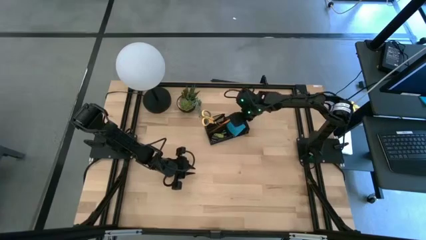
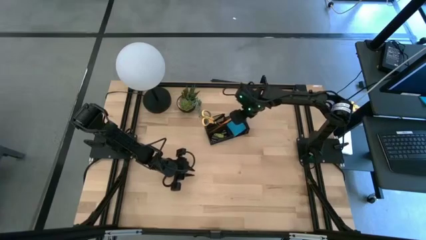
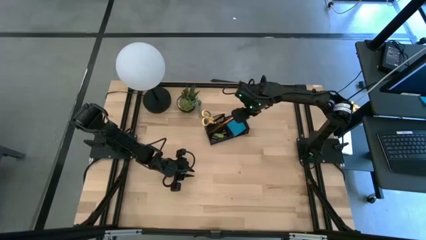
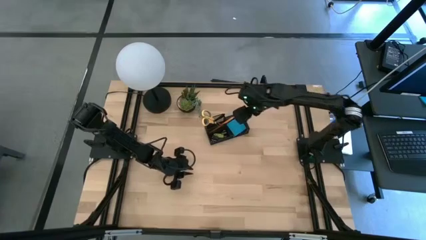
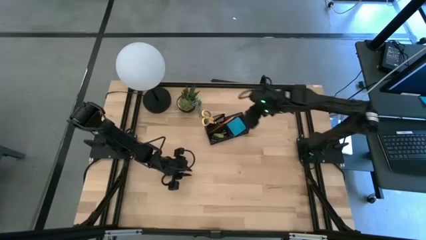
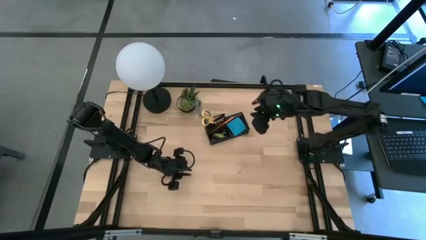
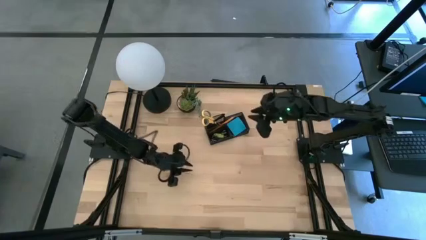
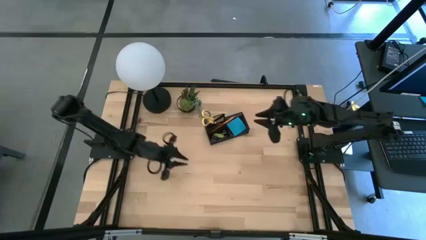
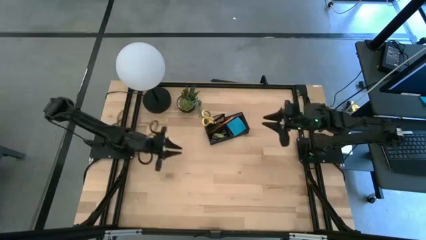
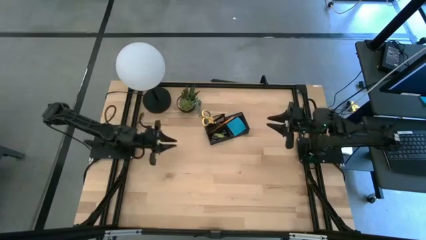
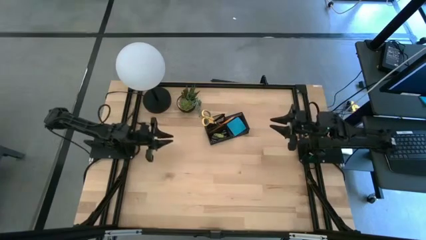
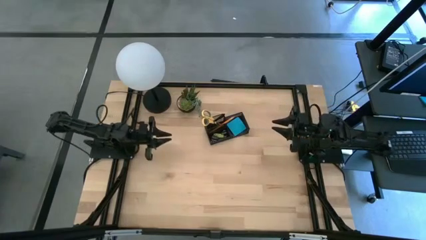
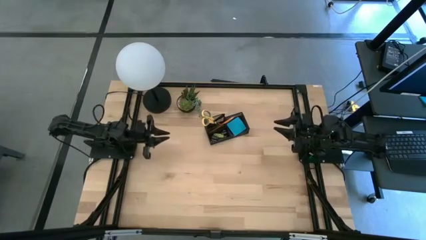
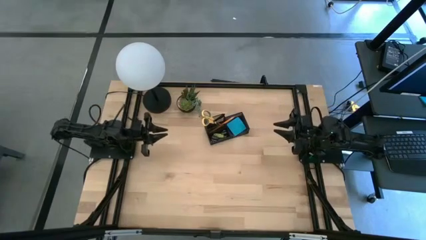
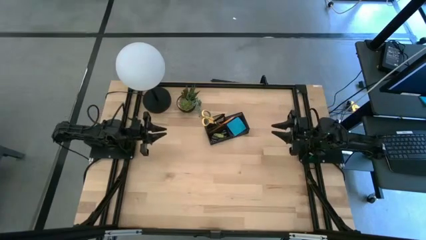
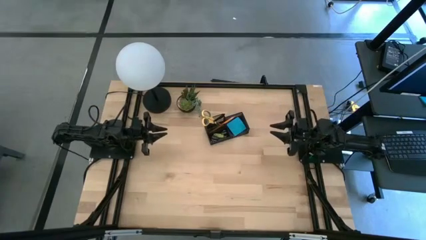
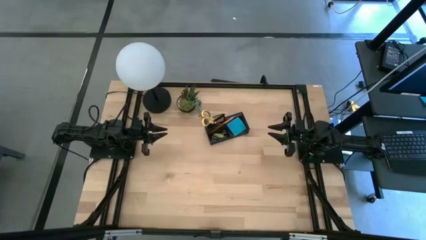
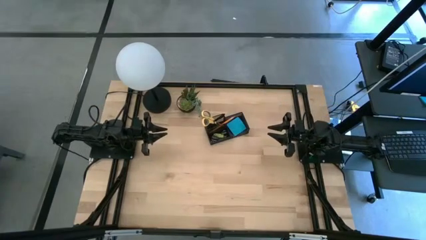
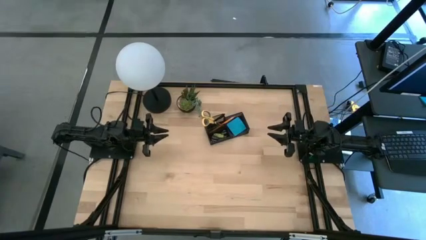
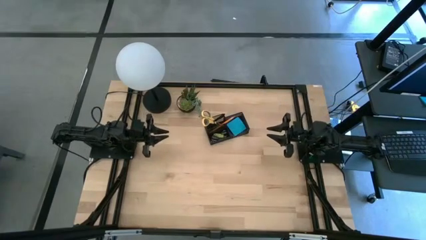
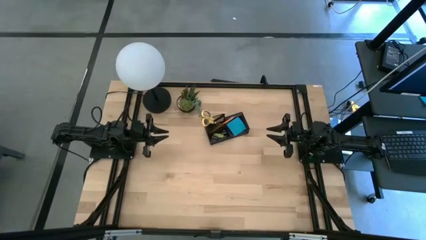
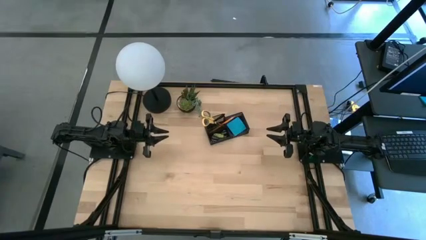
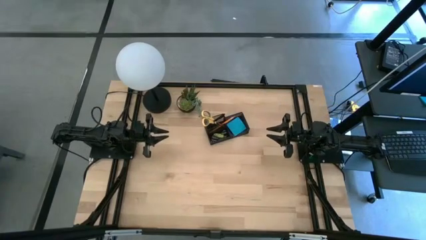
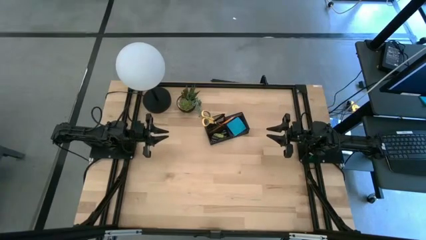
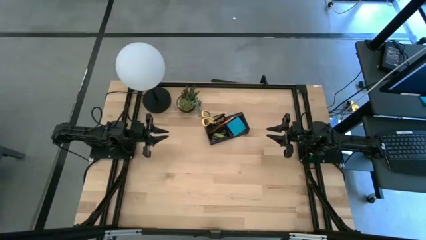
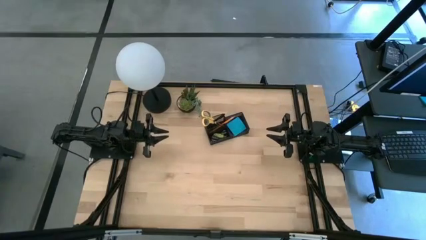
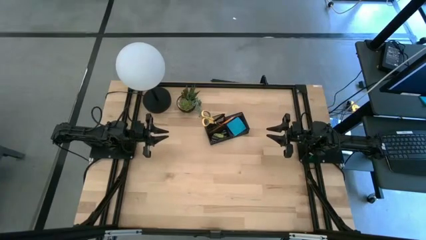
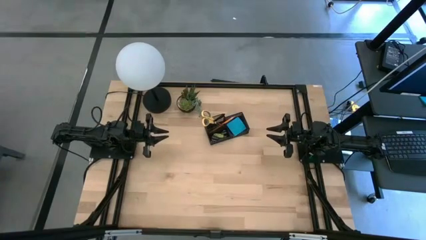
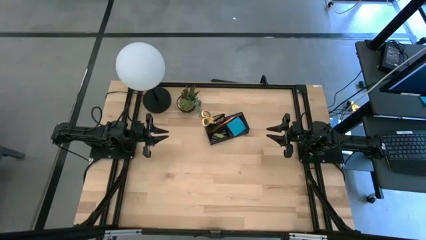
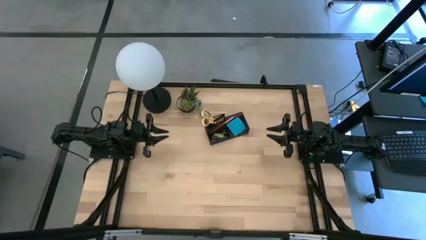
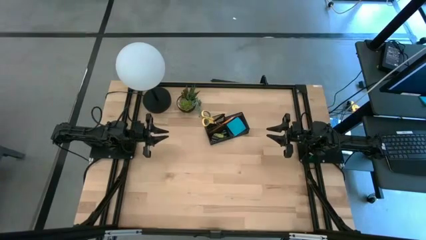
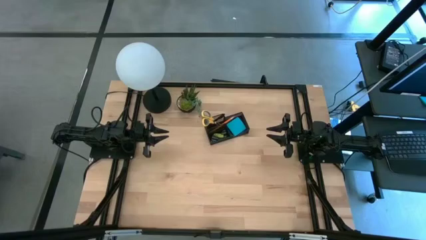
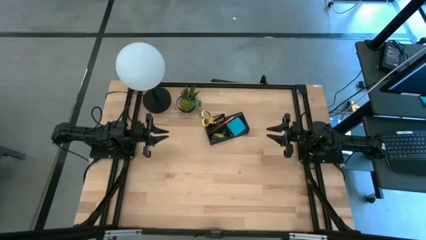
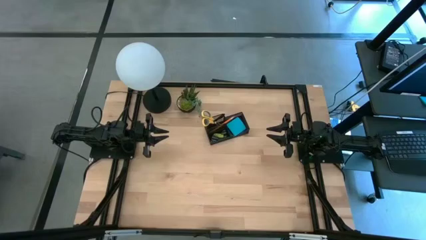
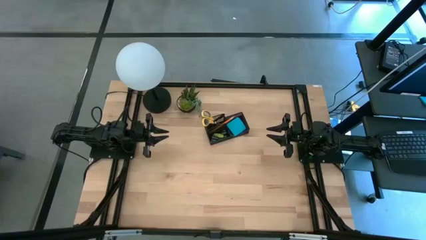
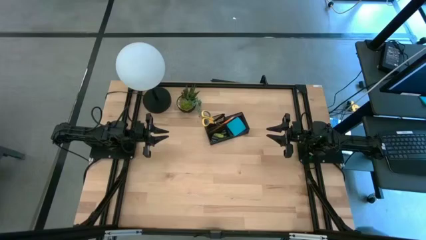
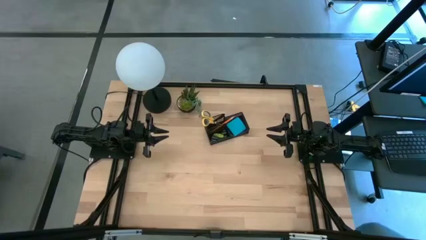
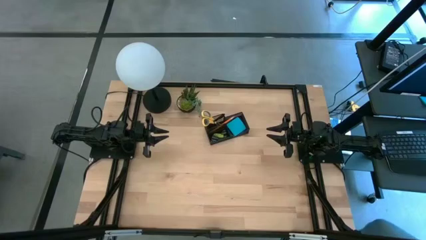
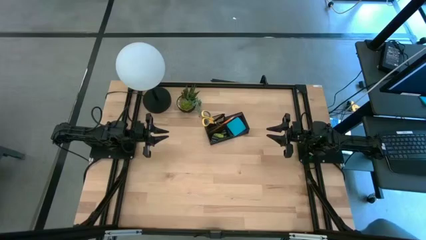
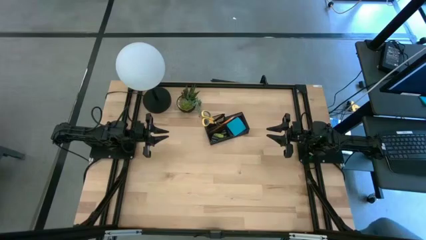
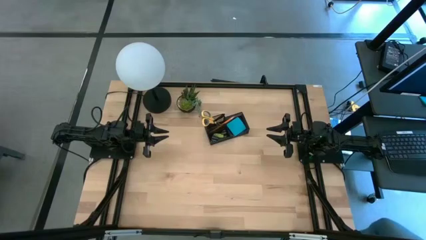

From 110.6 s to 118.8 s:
Task: Pick and place office supplies into organizer
Return to Home Position
